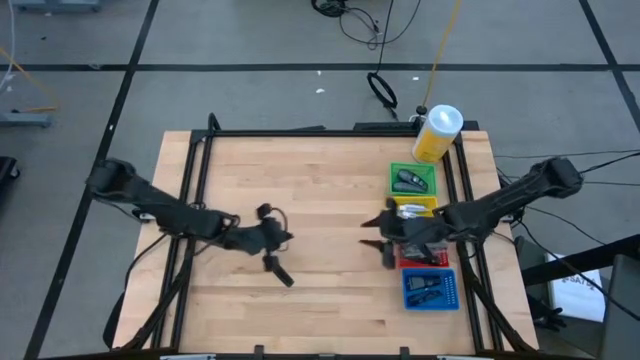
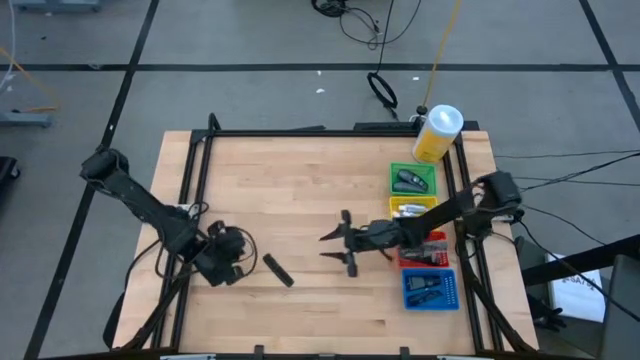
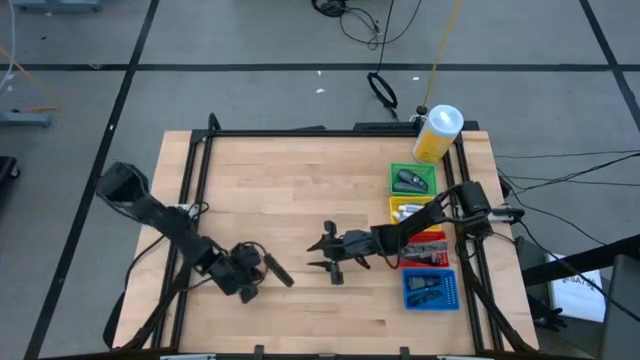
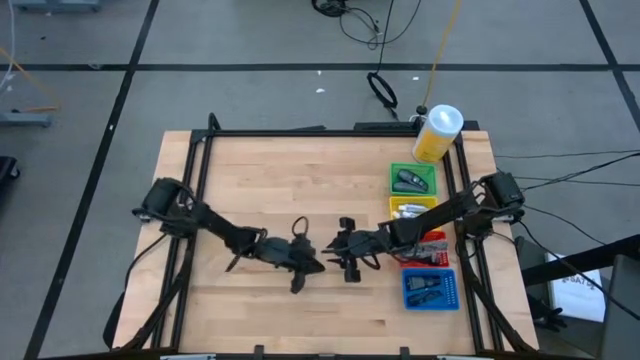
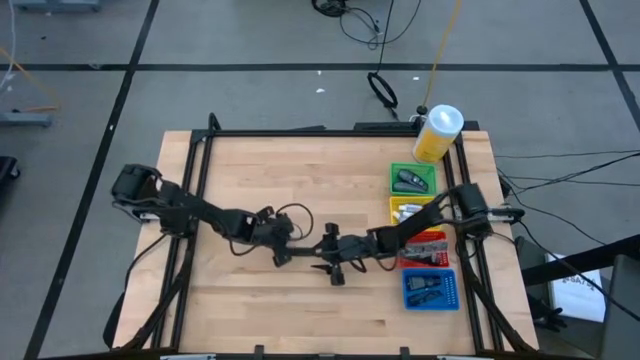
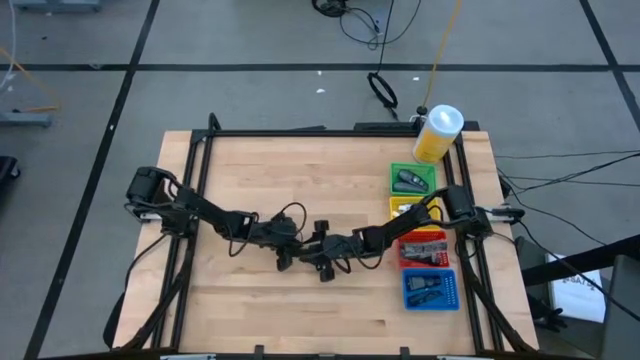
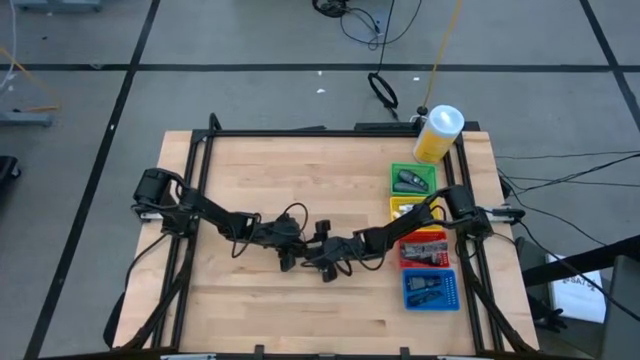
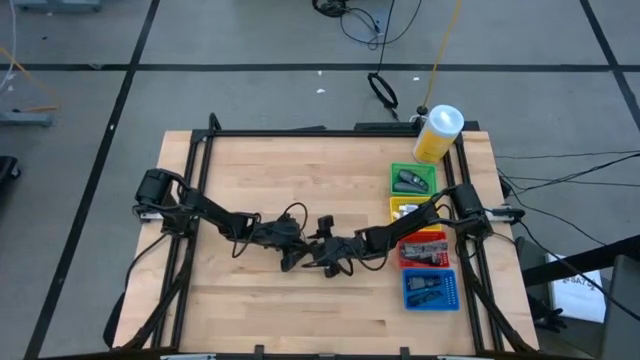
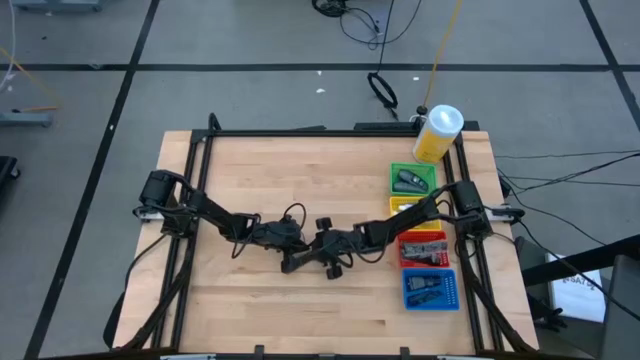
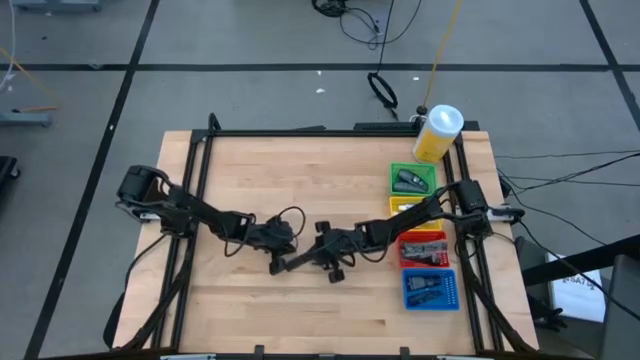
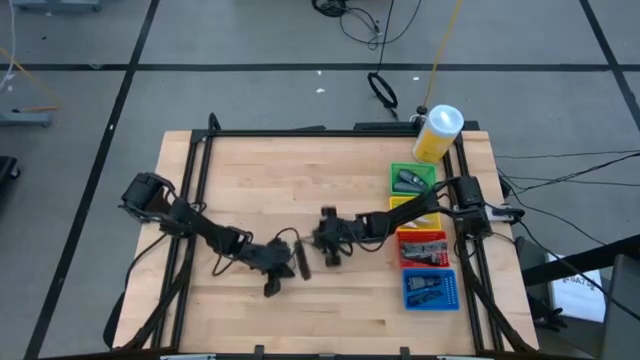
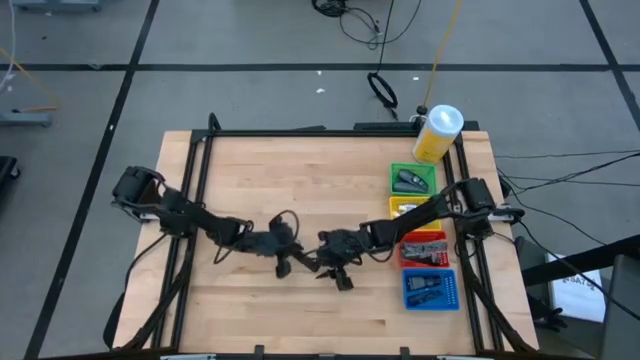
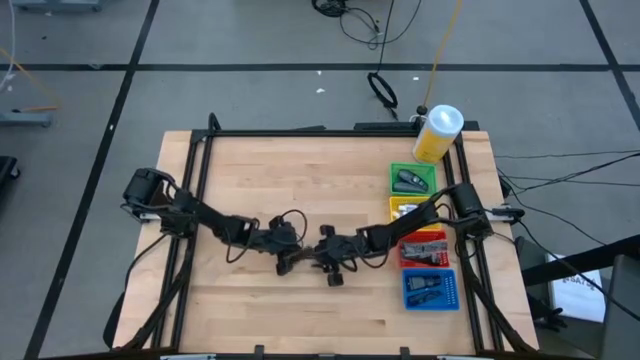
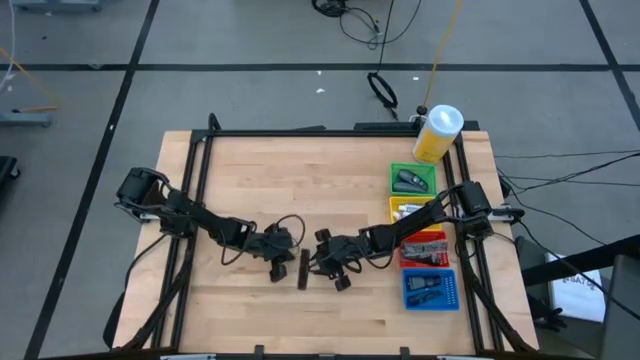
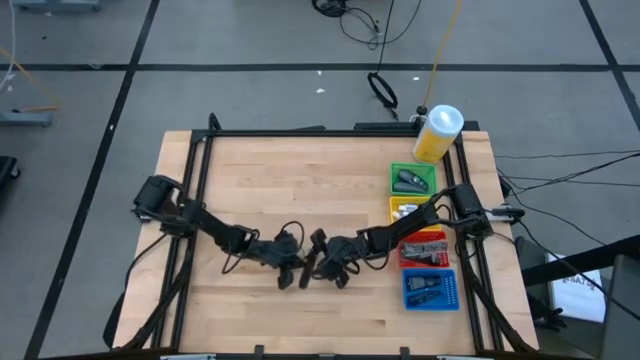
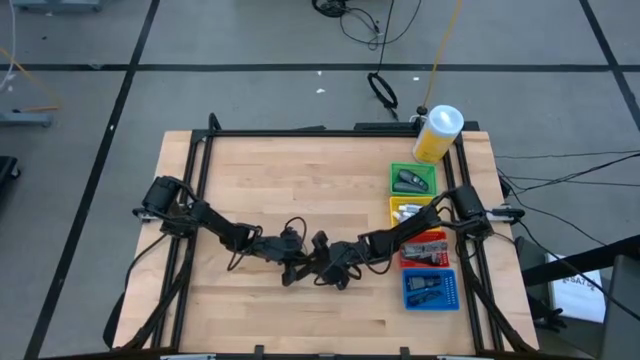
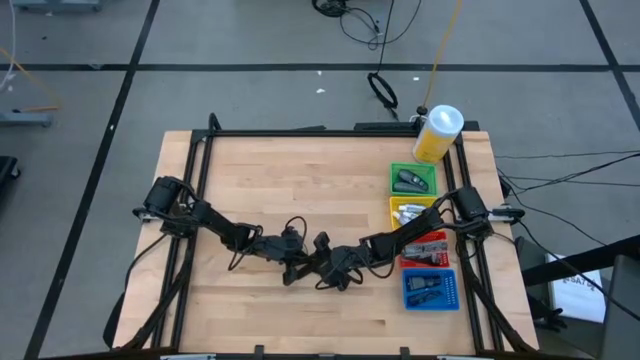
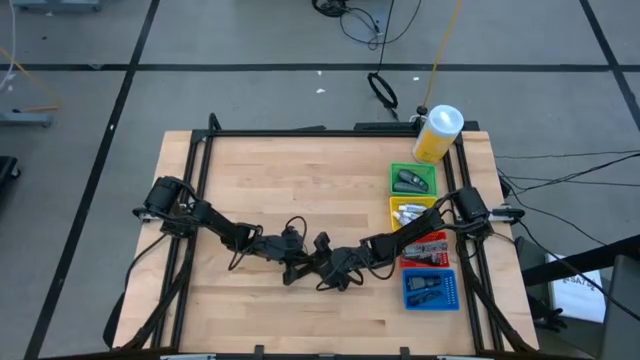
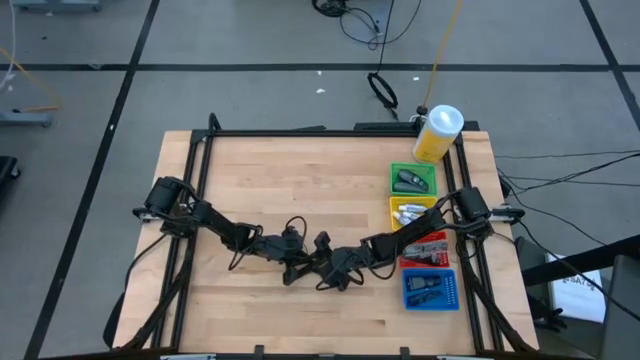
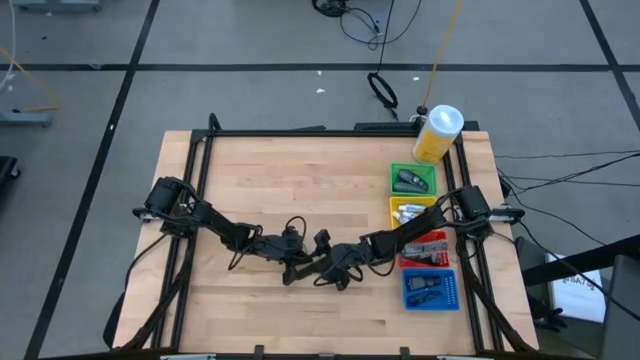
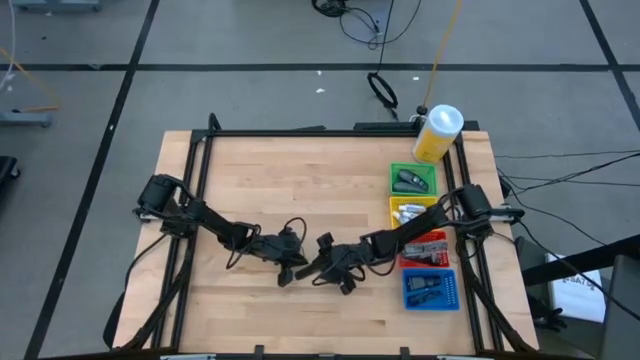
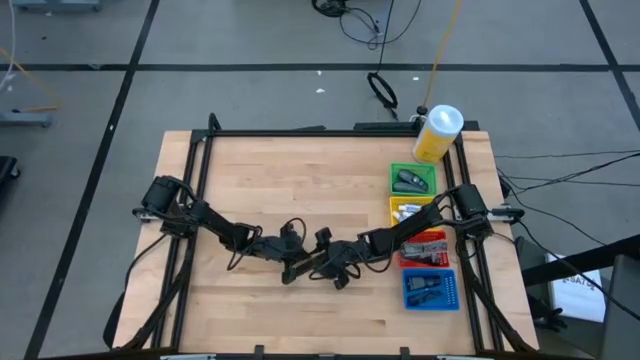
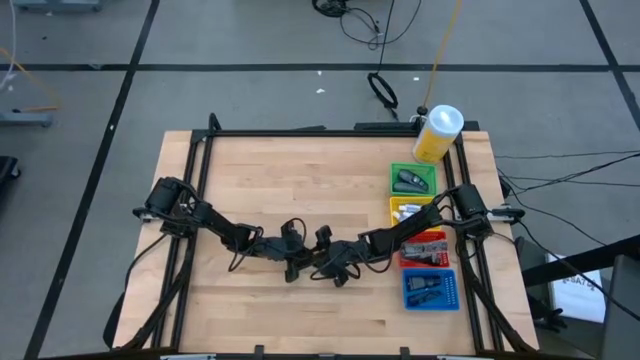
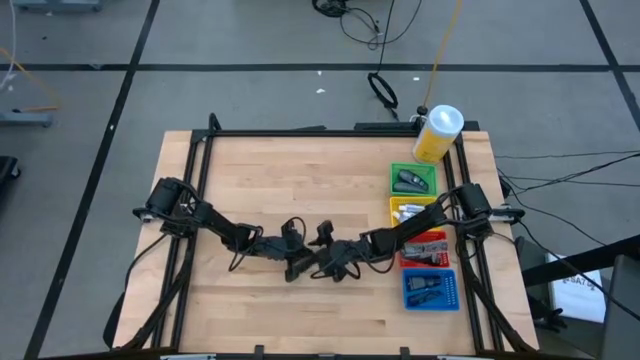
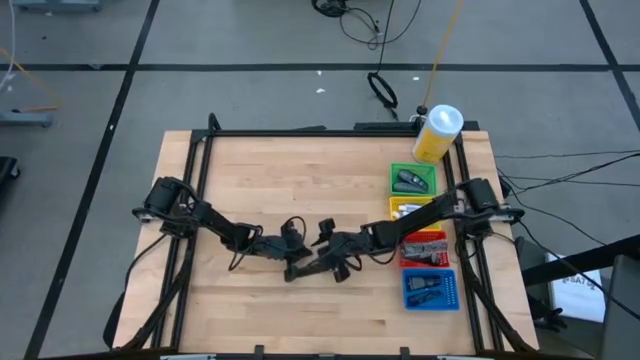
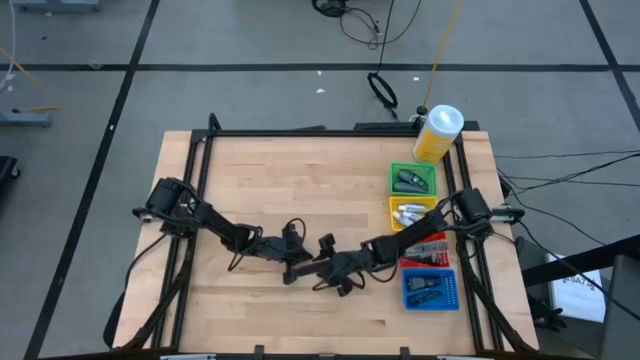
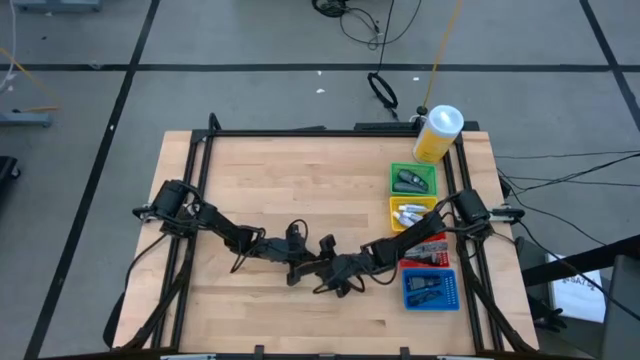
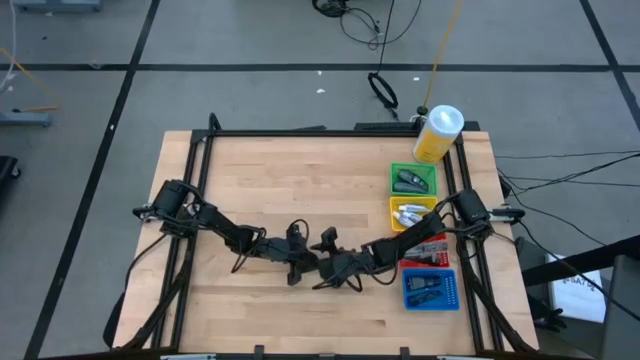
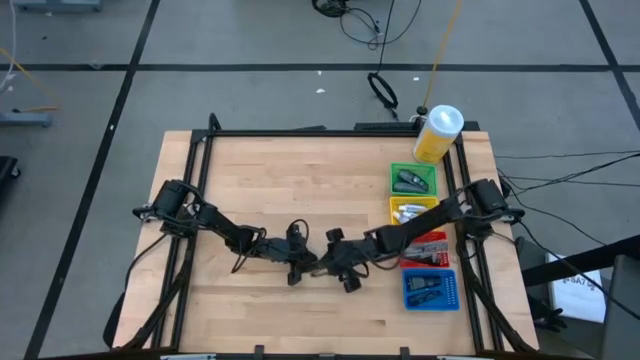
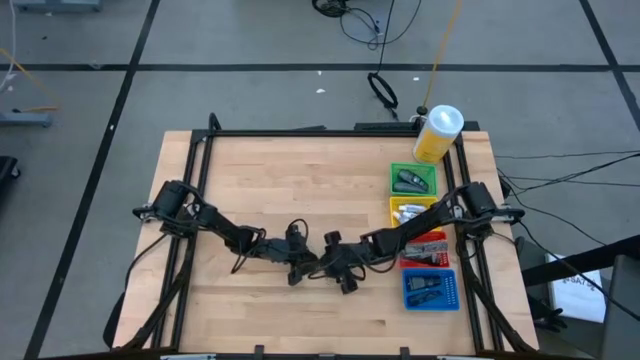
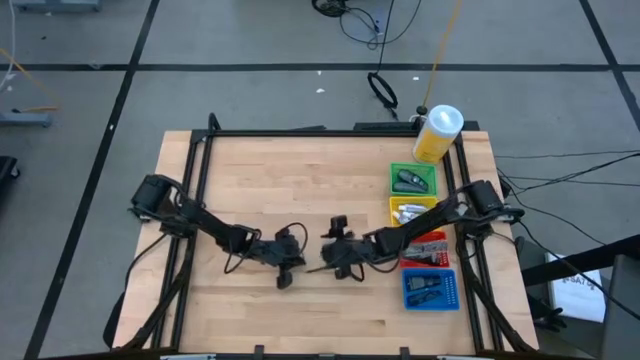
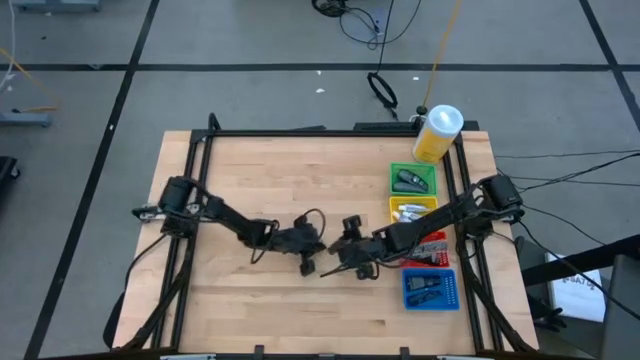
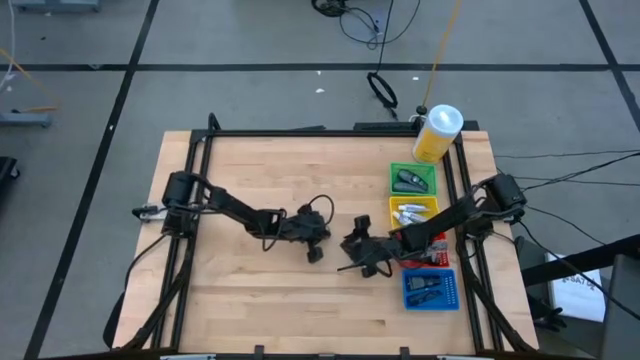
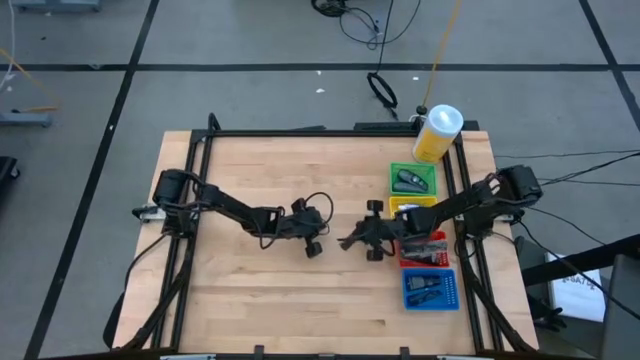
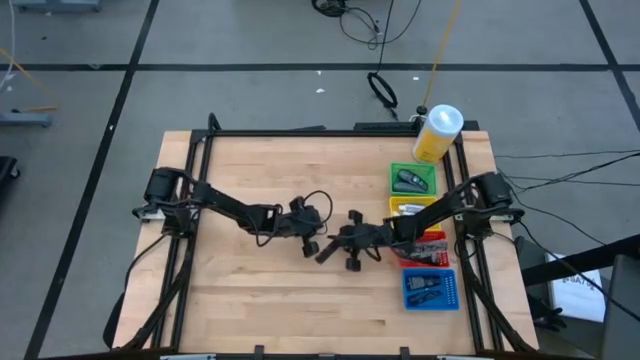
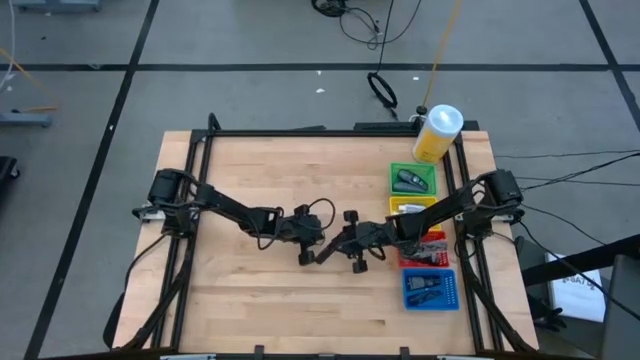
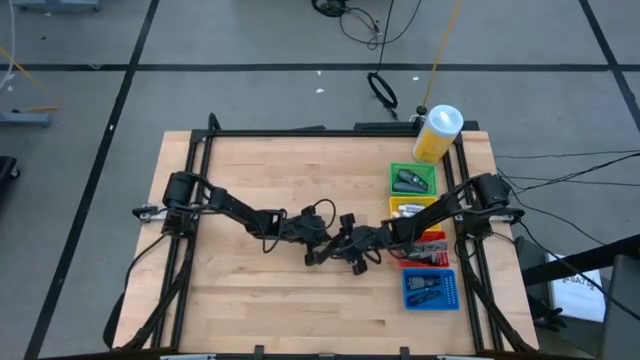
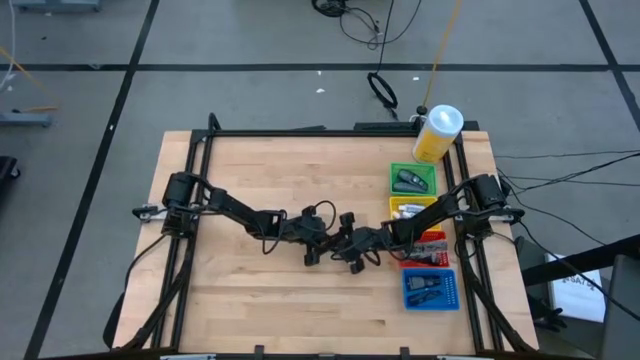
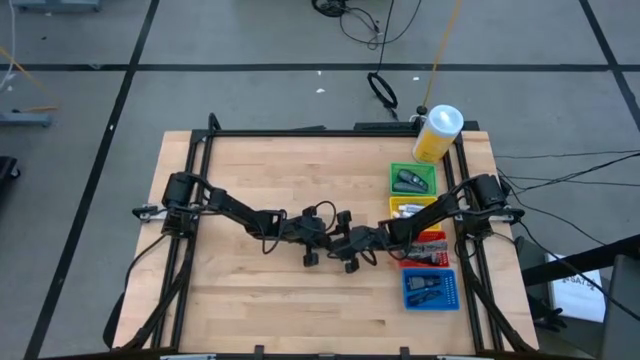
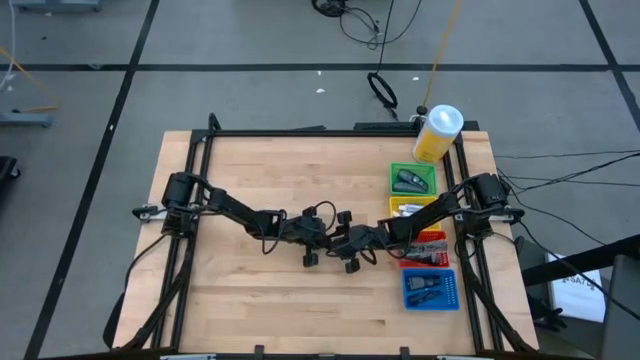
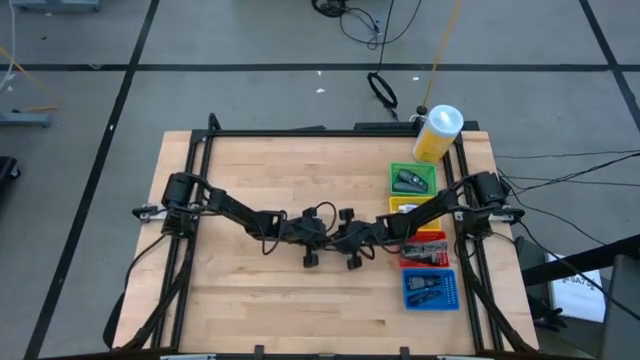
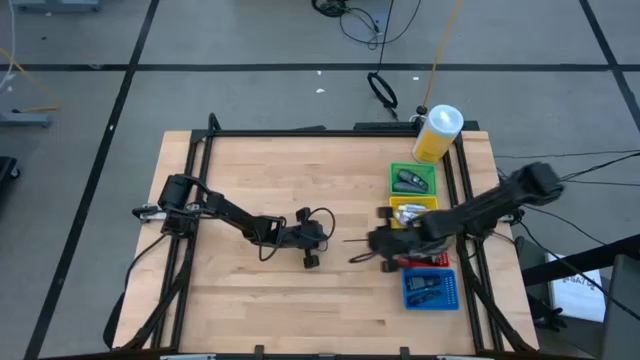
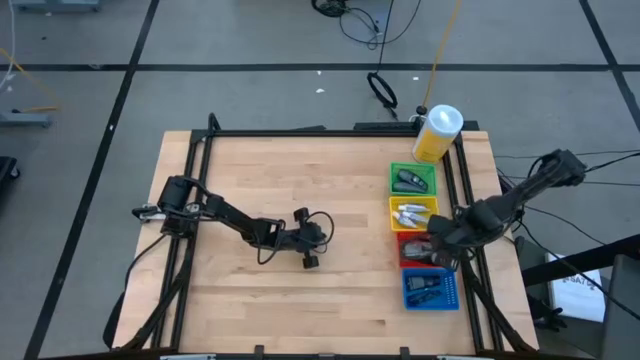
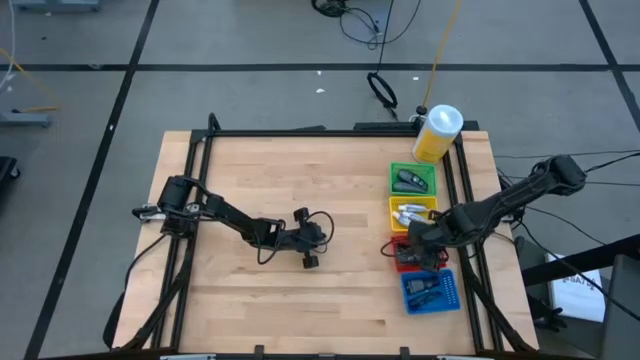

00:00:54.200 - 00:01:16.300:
Task: Pick & Place Travel size toiletries
Put the black comb into the red basket
